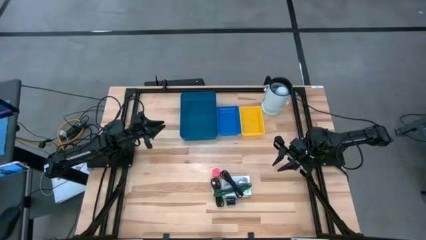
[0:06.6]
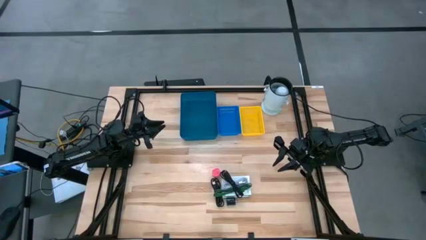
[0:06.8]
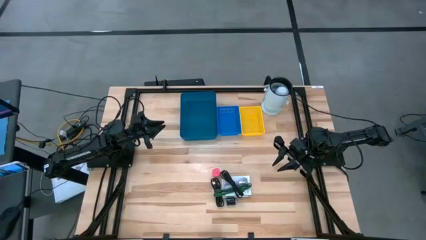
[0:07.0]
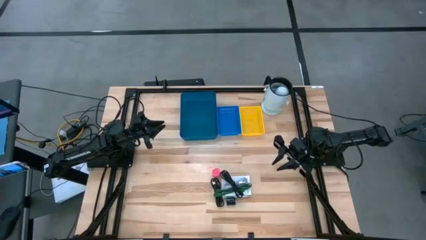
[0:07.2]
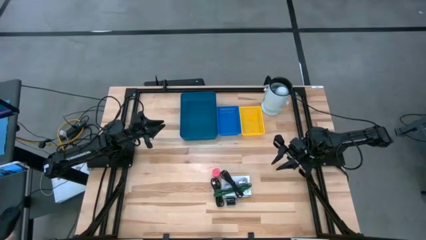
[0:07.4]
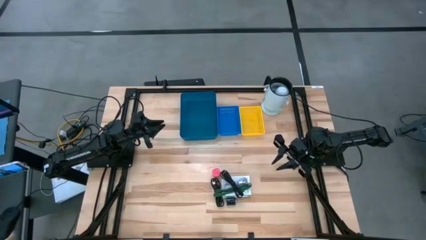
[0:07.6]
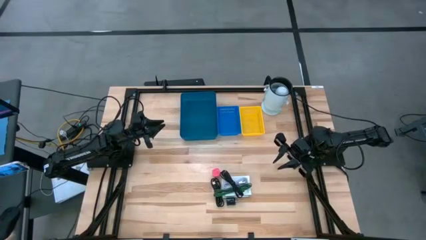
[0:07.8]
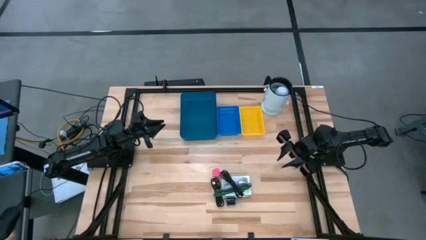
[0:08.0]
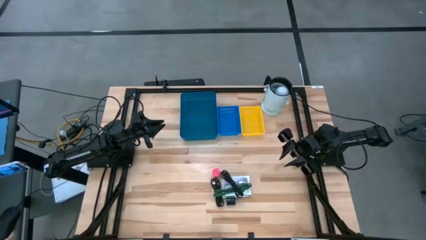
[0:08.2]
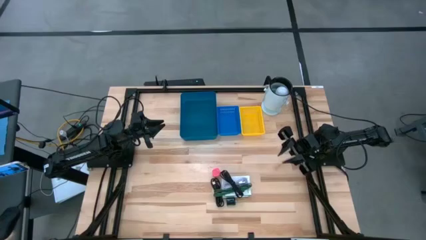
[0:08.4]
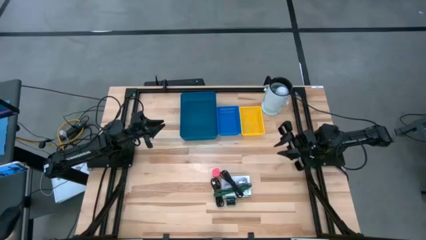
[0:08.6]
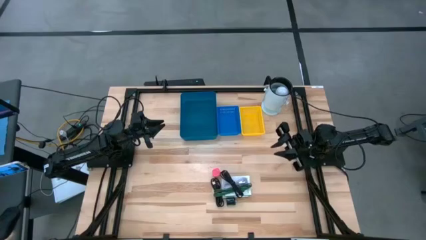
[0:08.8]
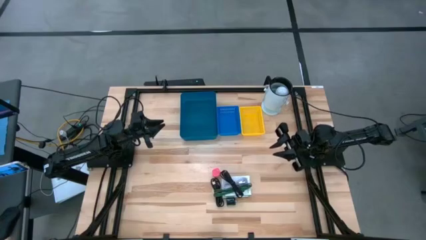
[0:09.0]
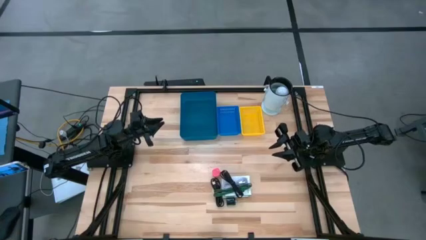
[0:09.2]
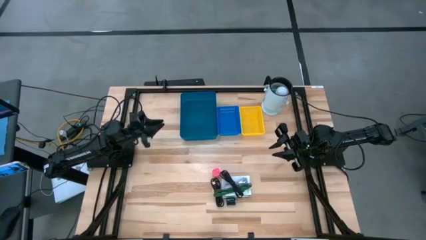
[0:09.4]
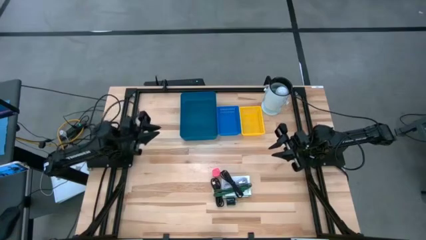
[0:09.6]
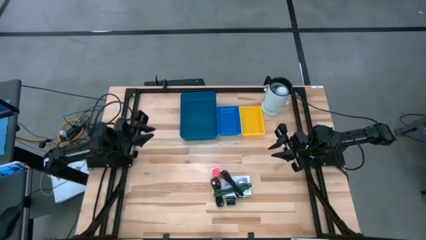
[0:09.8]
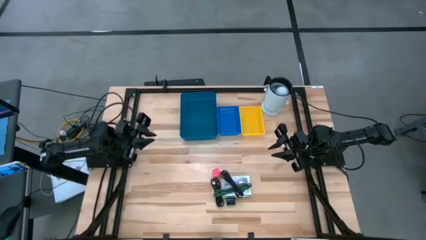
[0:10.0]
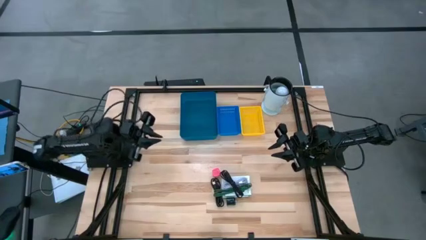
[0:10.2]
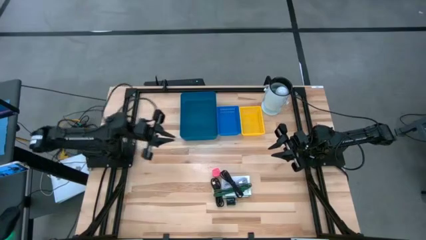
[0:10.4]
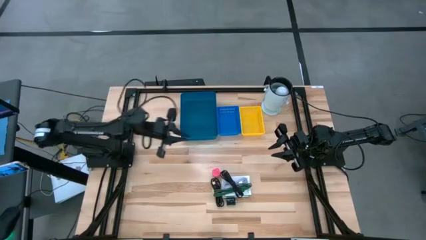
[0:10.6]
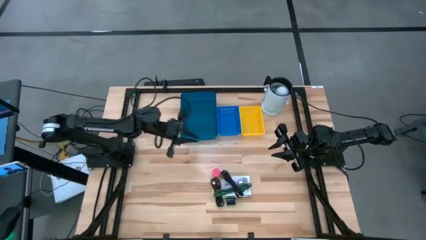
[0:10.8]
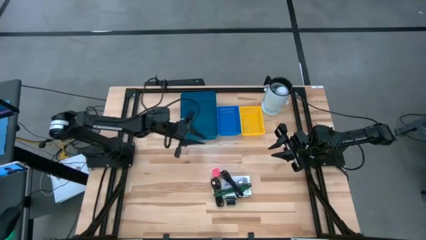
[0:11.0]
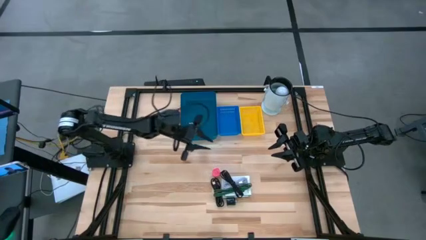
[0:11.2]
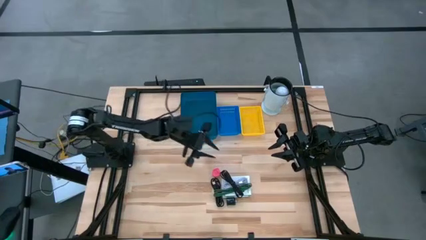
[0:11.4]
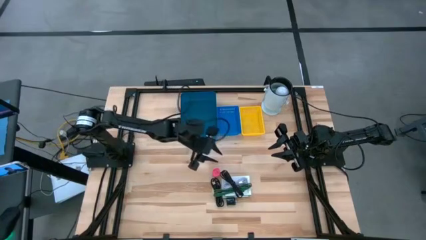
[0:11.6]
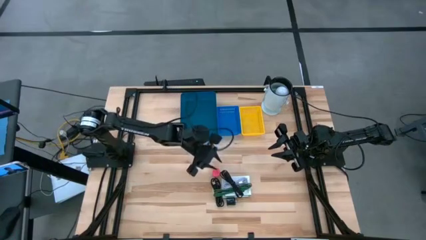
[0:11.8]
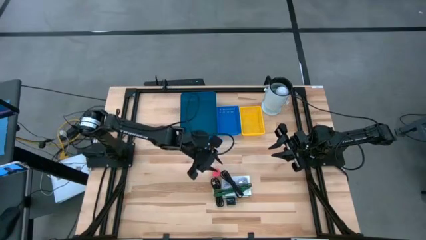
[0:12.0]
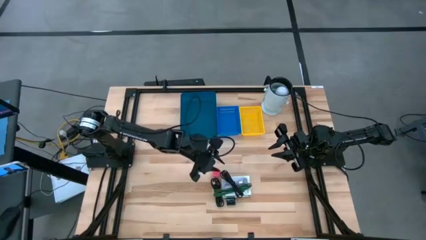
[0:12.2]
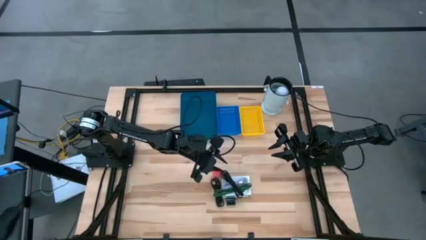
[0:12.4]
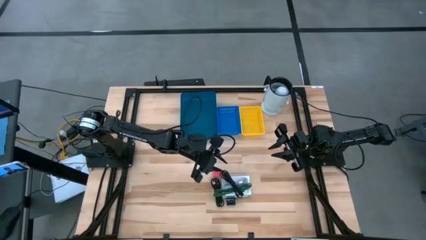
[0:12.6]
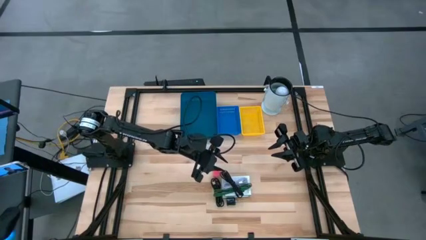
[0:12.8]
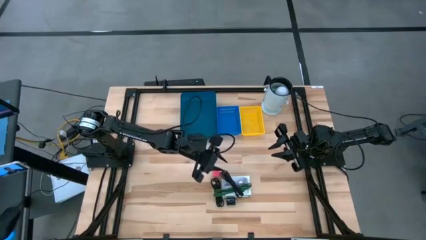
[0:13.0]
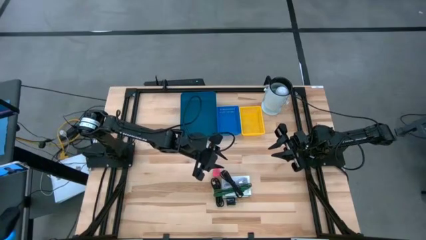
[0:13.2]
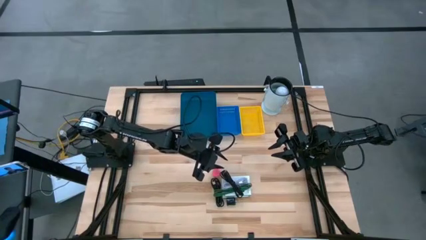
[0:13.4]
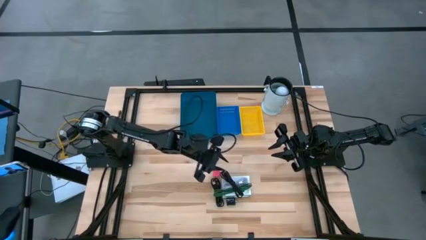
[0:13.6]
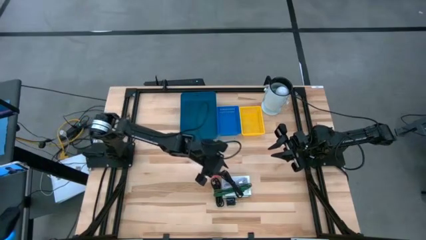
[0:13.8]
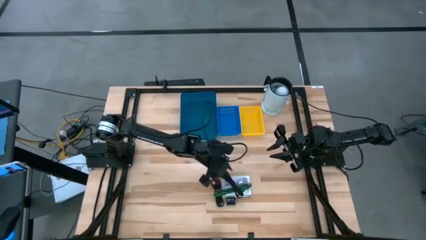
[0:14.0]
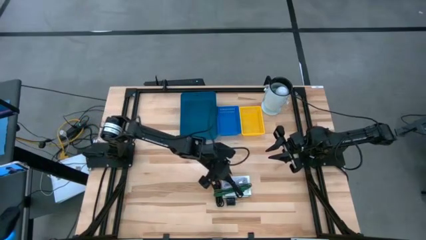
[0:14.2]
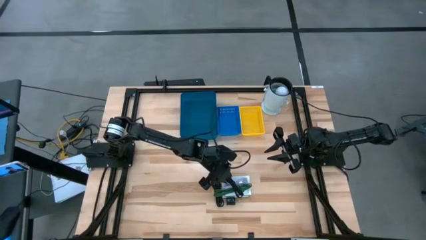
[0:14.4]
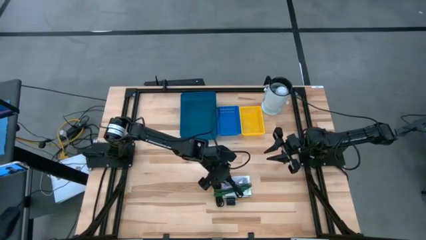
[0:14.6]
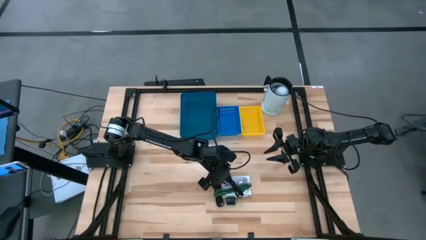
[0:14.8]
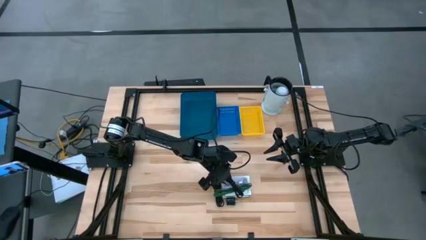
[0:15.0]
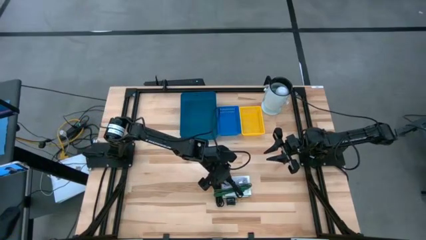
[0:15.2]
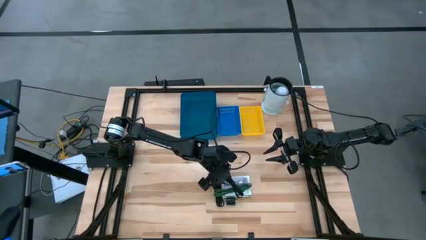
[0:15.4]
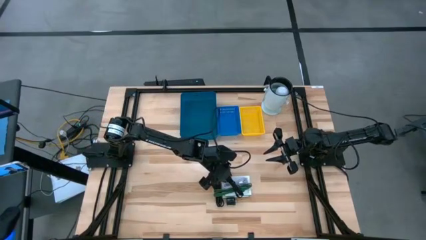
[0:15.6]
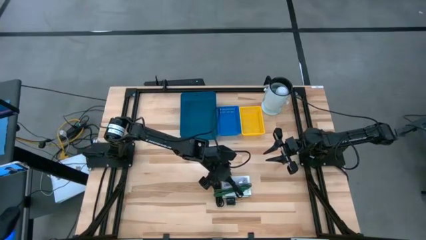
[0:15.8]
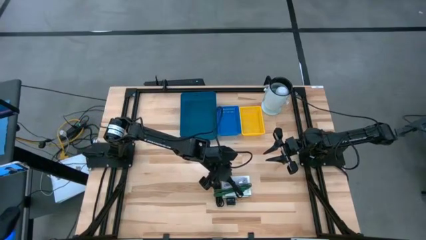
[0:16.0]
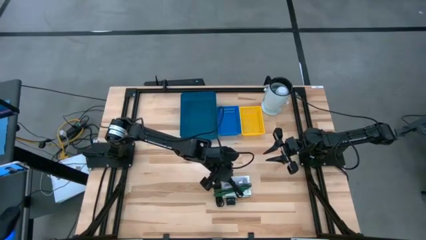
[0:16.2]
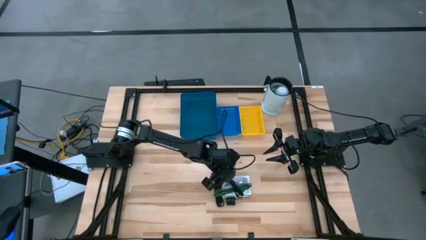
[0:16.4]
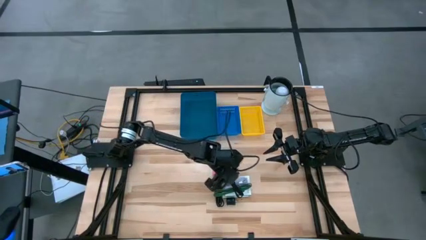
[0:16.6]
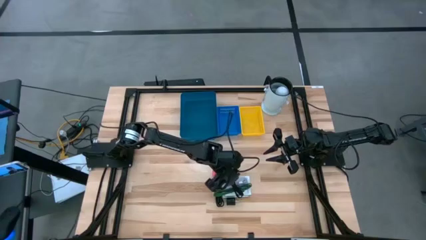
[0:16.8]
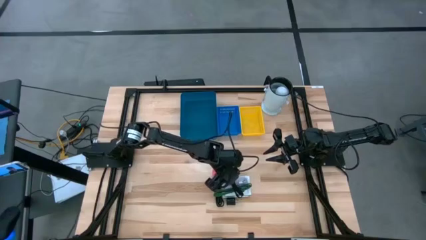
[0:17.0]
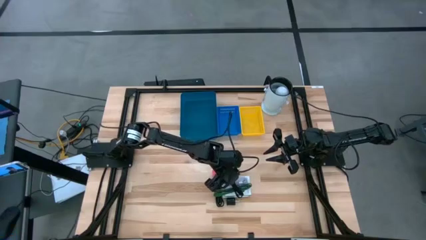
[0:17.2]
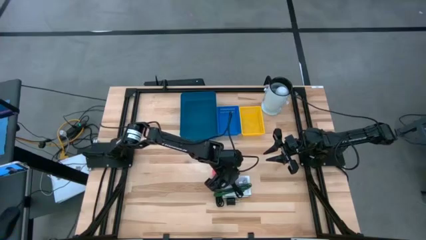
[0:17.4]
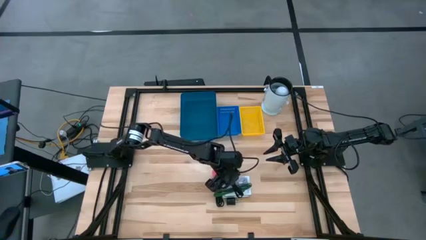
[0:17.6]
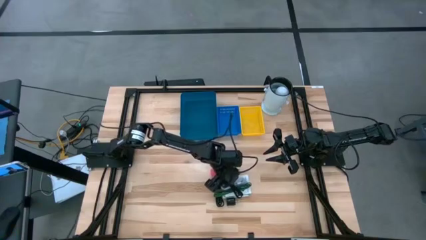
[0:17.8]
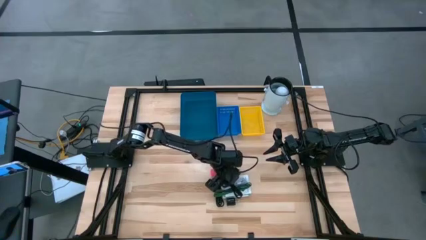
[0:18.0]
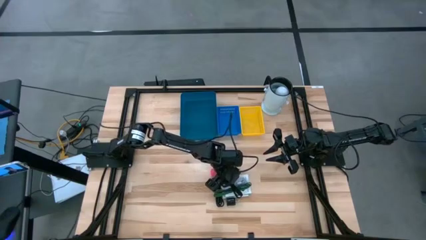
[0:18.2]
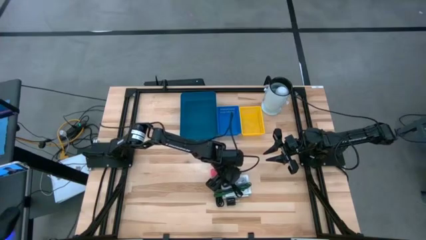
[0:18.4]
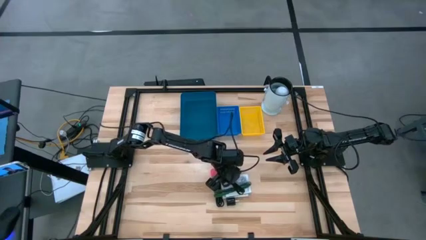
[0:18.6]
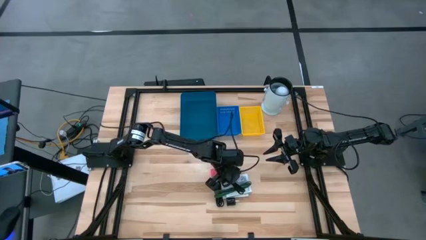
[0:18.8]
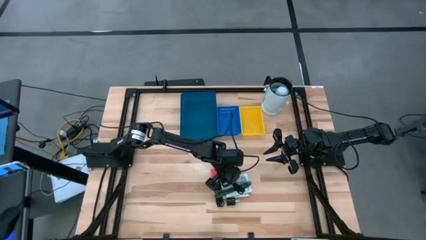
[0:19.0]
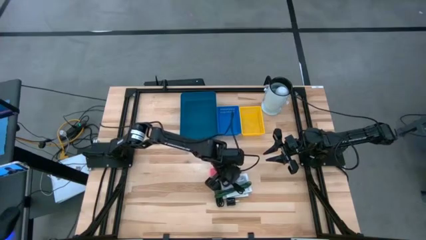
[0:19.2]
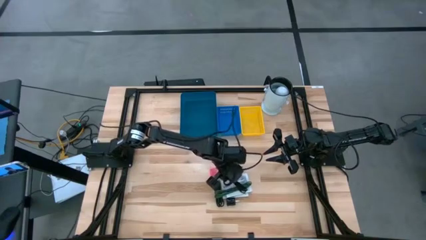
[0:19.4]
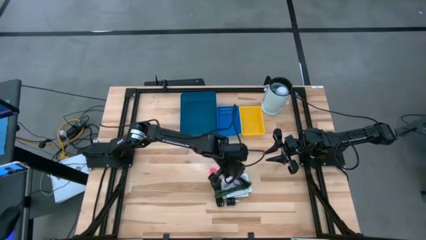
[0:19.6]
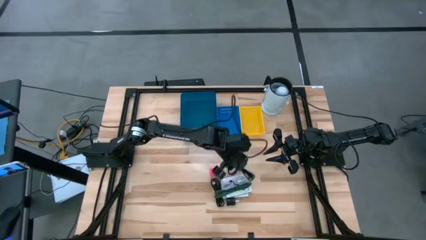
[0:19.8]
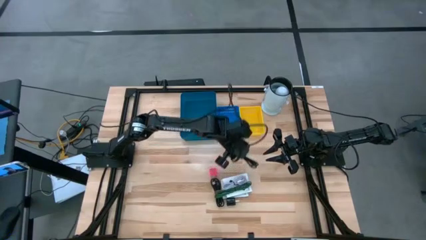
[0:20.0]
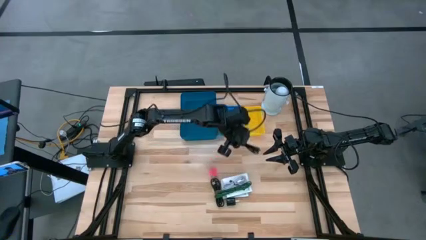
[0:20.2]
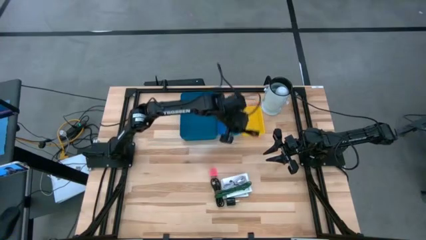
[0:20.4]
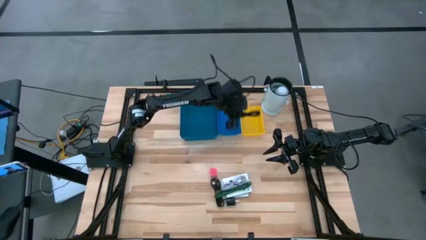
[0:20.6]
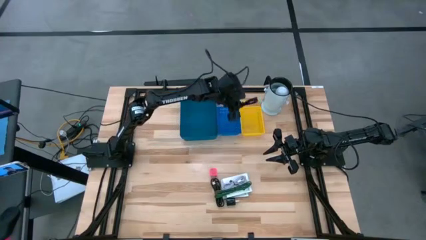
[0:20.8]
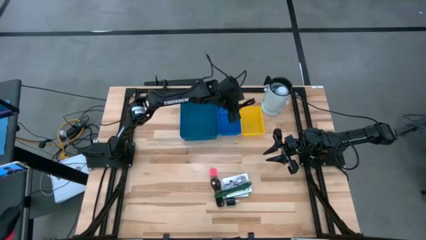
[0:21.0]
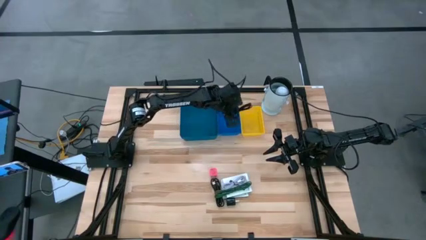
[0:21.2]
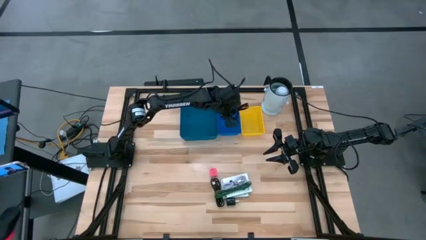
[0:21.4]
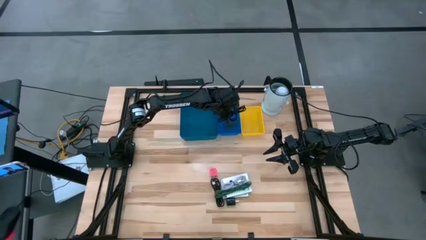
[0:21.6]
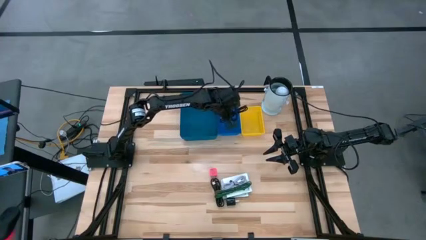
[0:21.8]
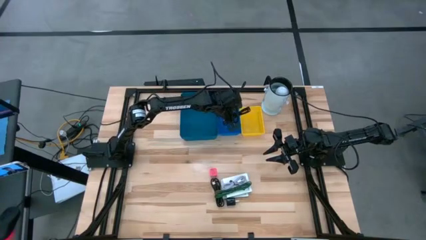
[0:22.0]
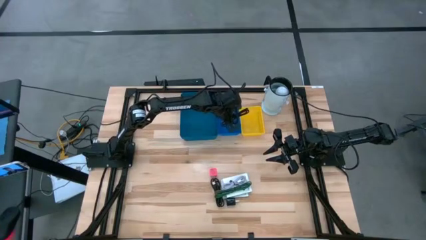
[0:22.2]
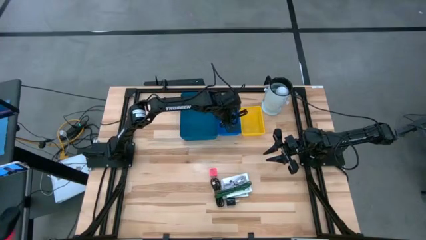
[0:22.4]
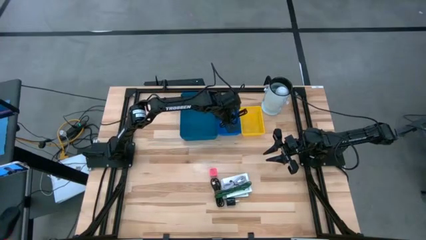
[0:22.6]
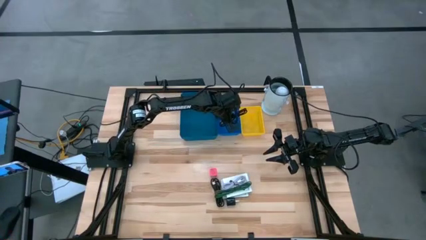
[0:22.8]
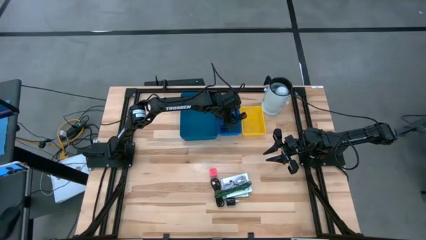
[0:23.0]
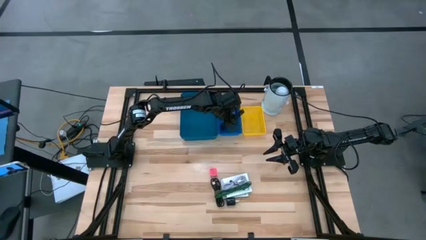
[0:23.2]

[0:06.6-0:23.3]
Task: Pick and place items into bin
Put the right black charger cable into the blue basket
